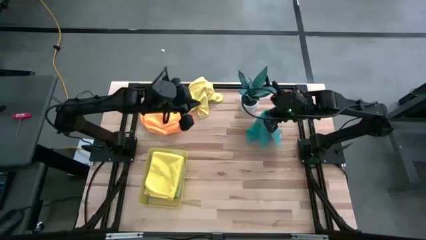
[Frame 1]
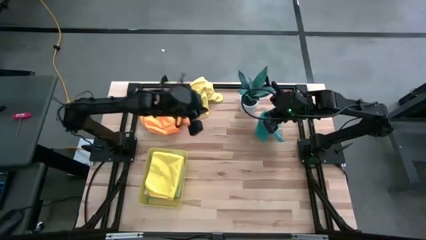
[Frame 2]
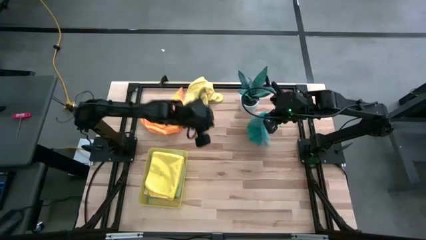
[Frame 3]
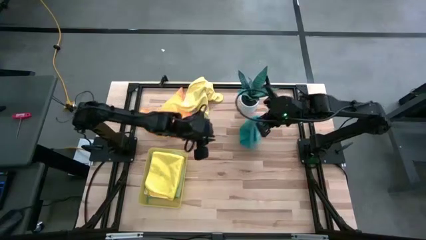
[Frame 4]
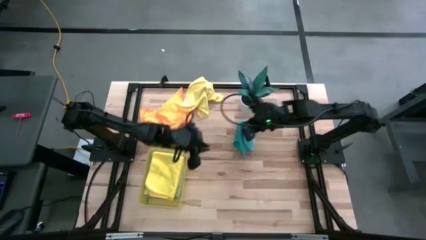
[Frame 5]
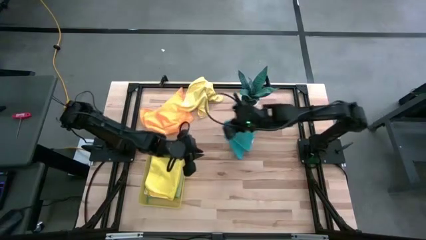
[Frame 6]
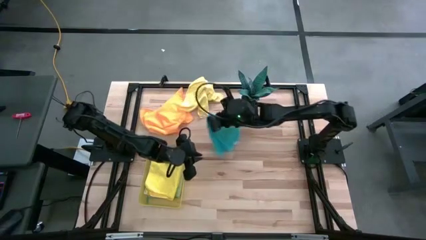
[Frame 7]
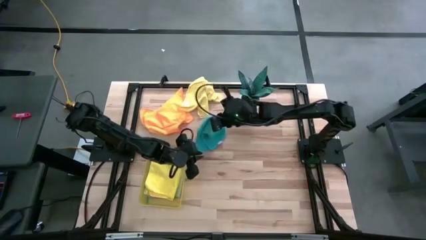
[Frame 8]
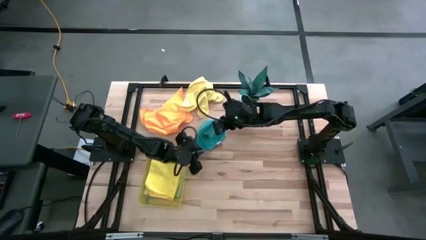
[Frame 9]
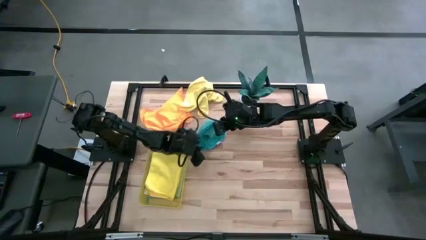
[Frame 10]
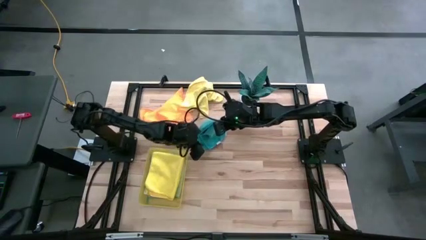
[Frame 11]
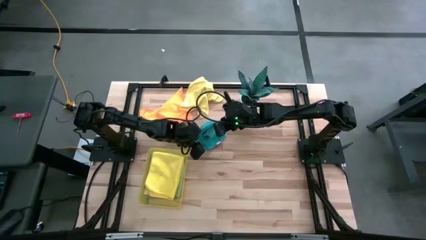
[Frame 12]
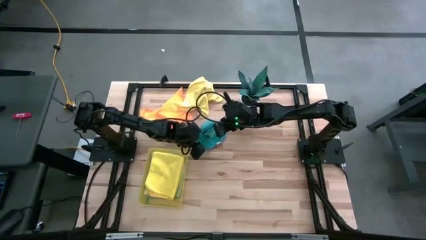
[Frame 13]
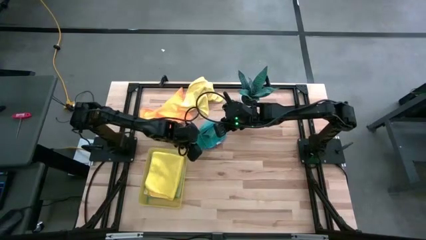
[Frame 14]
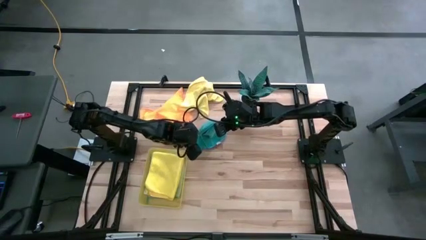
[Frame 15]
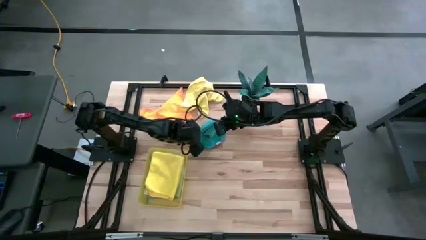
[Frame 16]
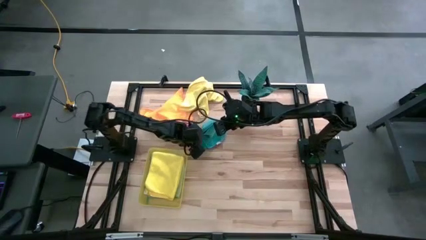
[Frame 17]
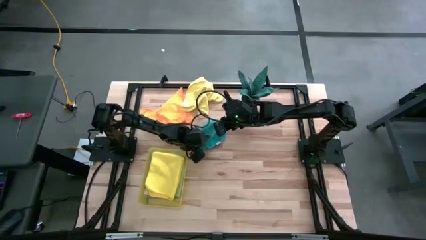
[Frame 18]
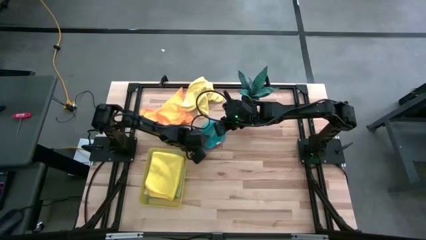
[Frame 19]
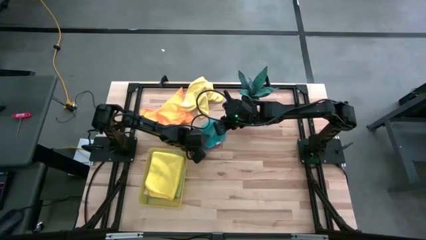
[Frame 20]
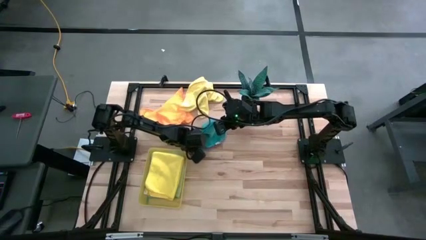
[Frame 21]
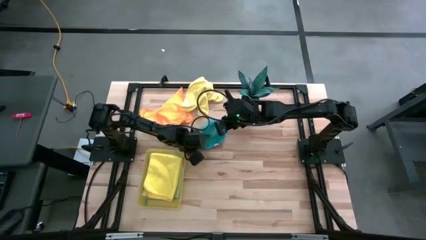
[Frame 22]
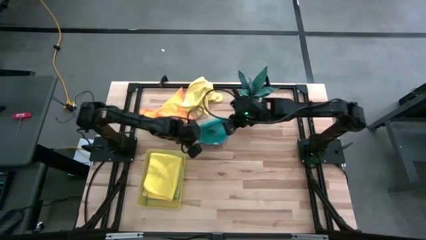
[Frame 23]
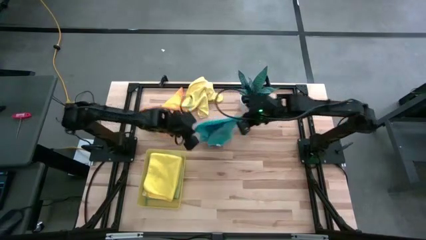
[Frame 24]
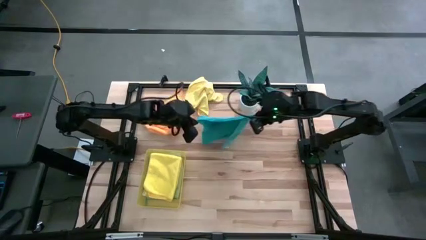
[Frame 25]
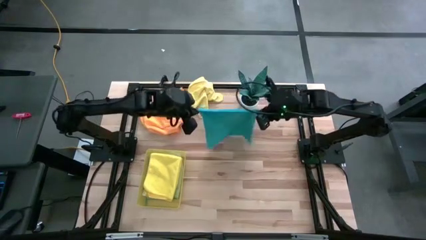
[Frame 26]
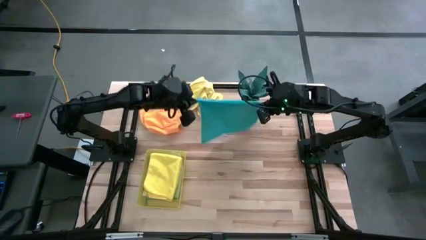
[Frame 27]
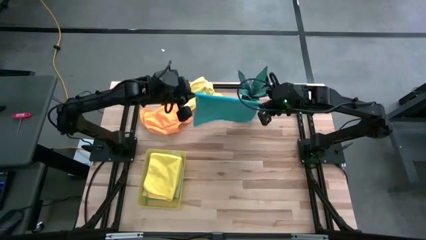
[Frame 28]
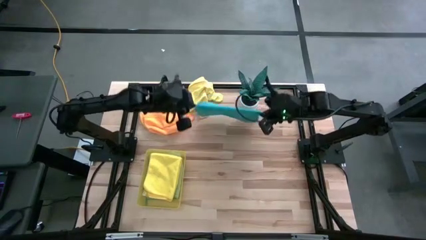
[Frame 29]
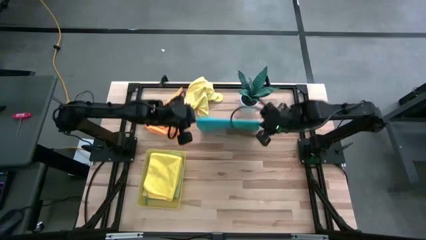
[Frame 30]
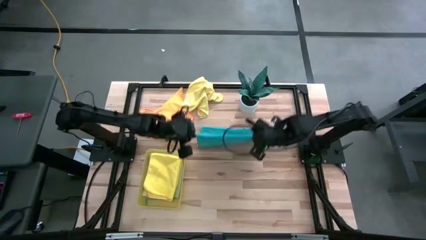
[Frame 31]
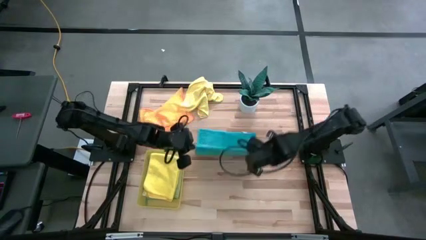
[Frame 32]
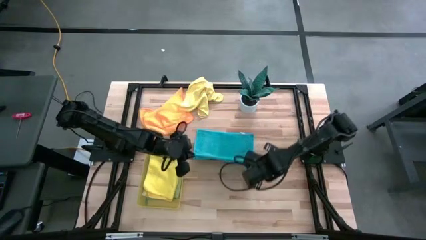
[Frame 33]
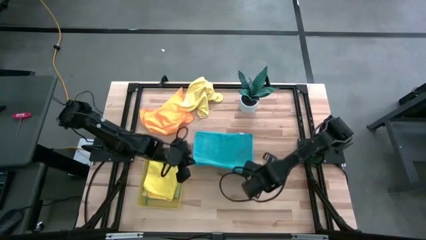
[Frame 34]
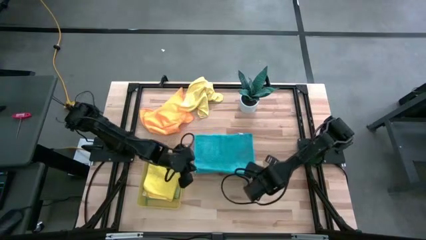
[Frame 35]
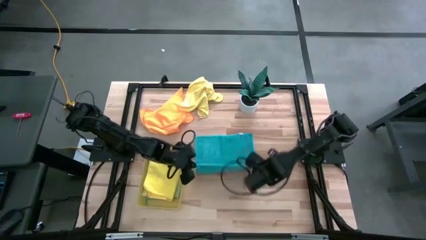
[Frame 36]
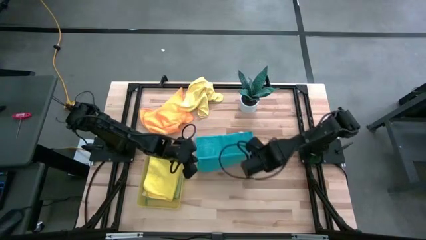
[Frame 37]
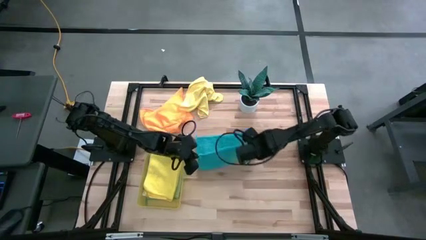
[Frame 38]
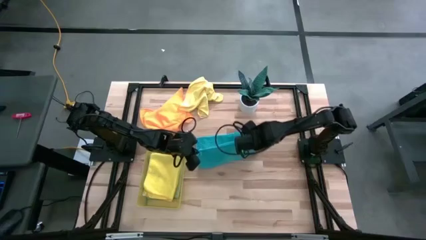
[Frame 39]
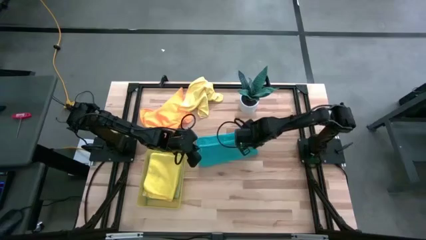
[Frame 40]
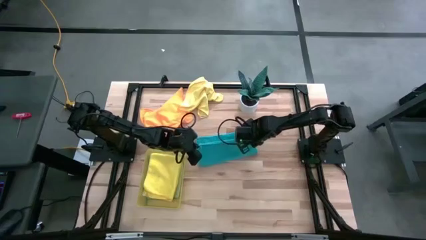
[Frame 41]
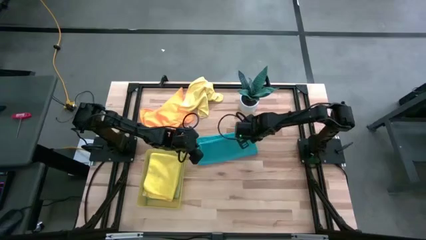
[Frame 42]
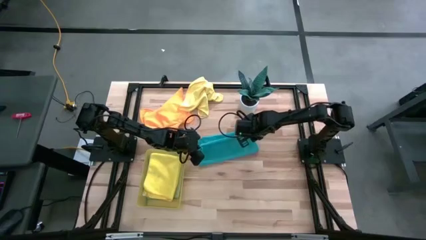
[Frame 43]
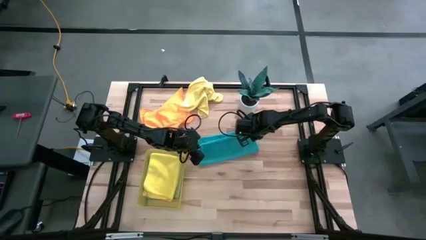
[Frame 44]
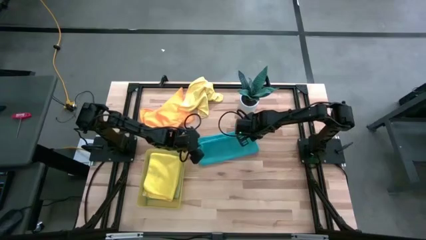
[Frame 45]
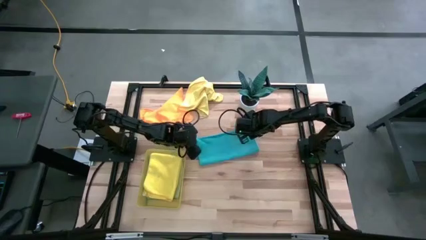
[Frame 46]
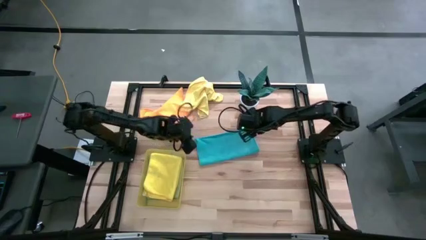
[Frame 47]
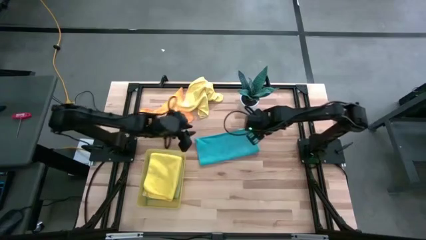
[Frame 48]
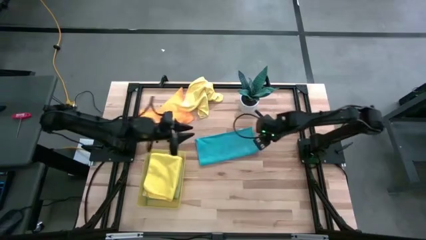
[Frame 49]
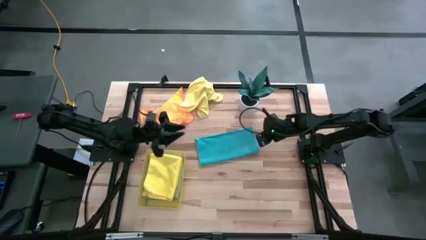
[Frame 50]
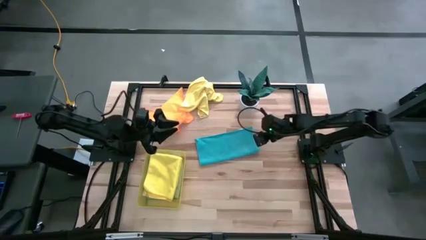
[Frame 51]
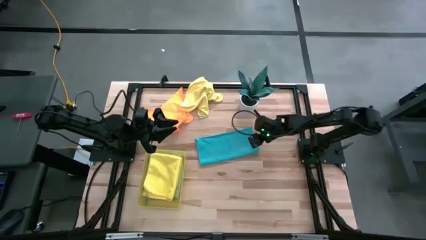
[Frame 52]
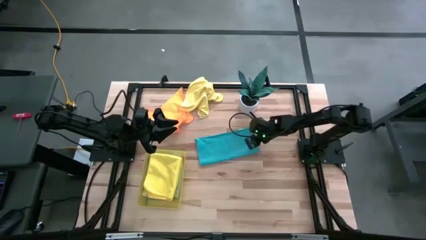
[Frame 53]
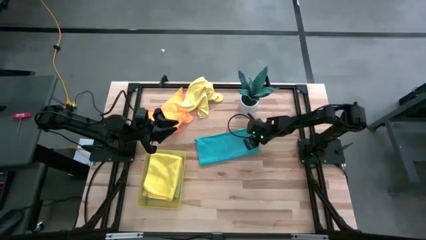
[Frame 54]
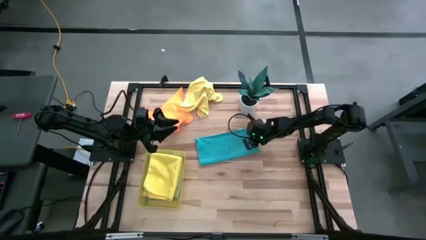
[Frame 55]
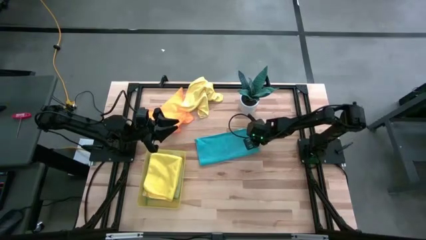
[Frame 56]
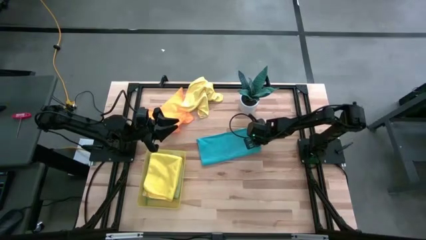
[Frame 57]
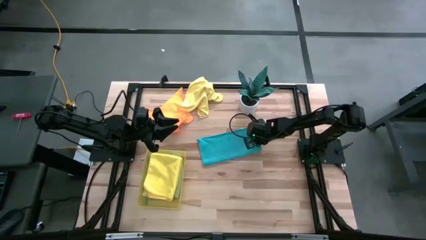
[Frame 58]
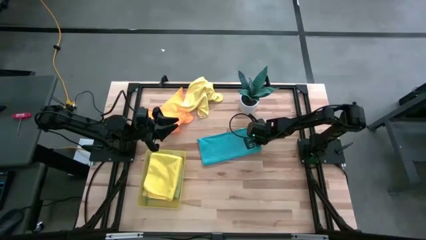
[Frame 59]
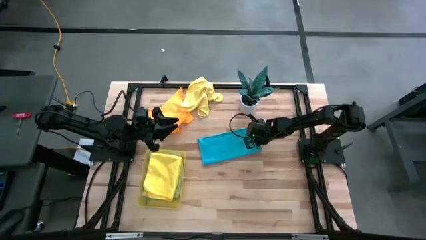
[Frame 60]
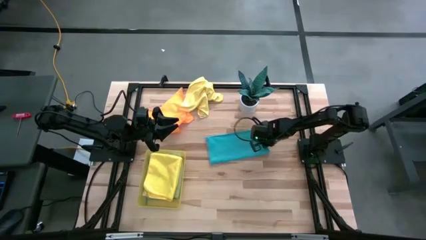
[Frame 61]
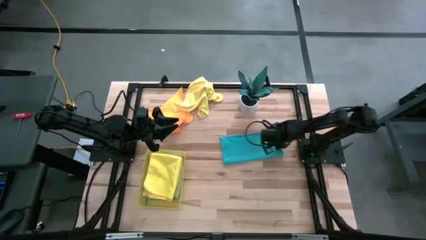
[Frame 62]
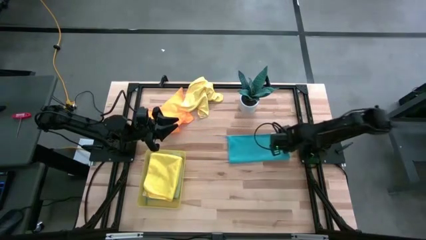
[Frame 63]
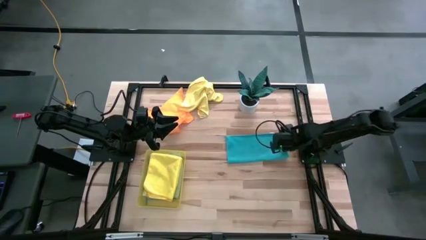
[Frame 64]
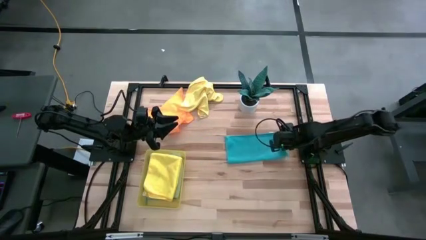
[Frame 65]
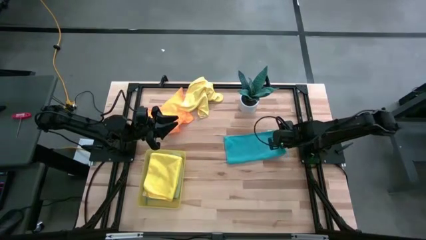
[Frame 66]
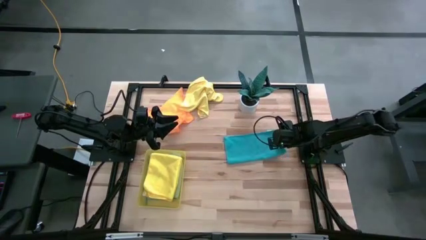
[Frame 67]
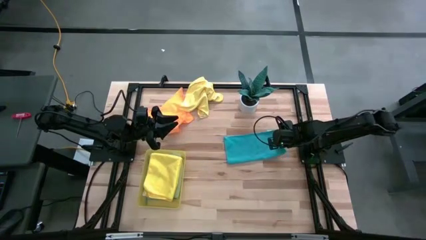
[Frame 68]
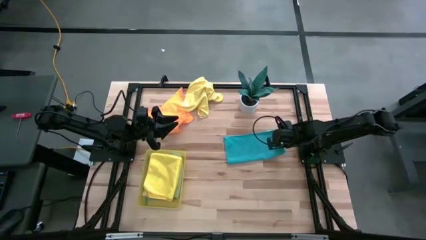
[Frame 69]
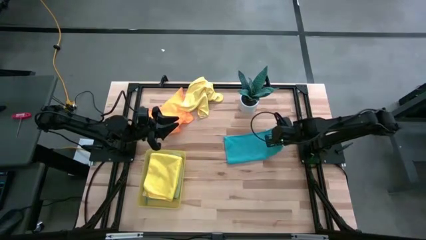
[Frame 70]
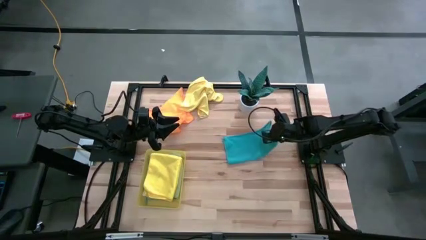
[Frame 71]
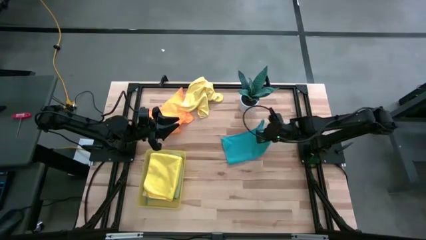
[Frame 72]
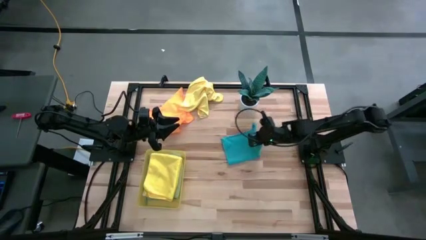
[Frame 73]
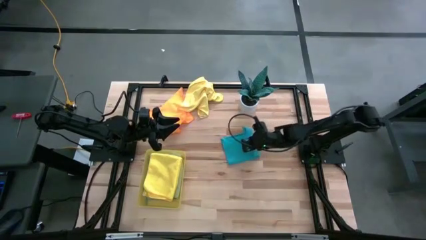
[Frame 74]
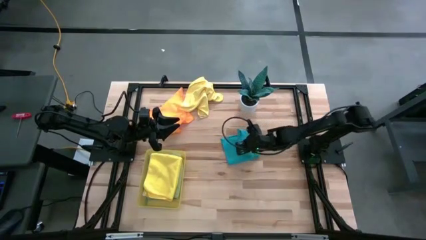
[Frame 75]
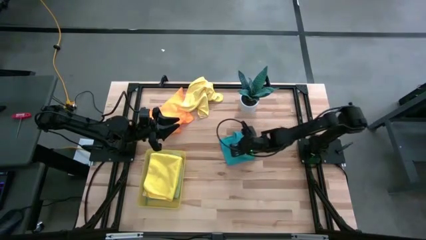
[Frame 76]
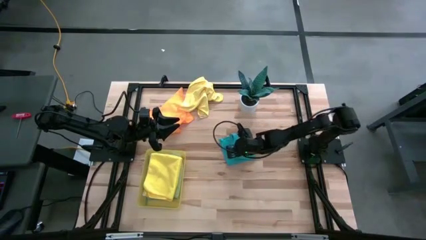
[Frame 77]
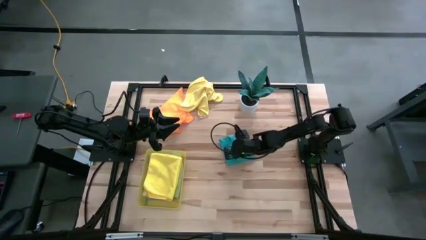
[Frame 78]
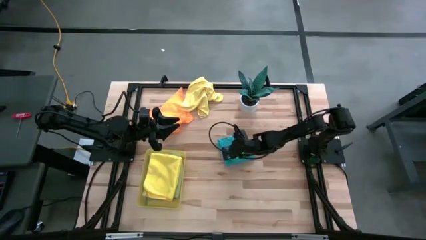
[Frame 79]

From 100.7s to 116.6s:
Task: Fold microfiber towels
Fold the blue microfiber cloth
